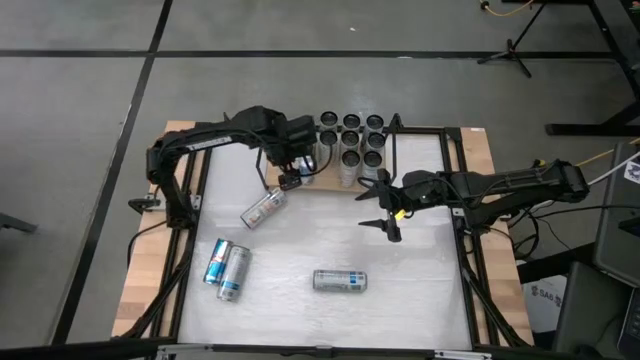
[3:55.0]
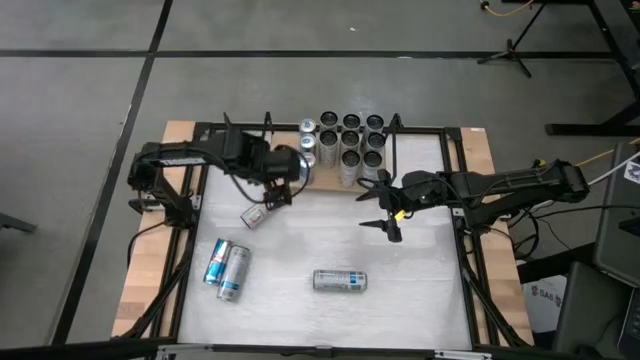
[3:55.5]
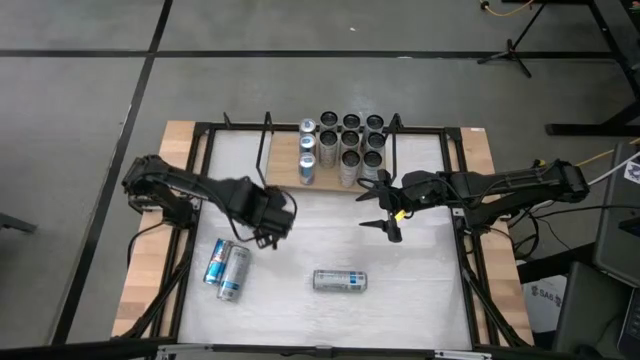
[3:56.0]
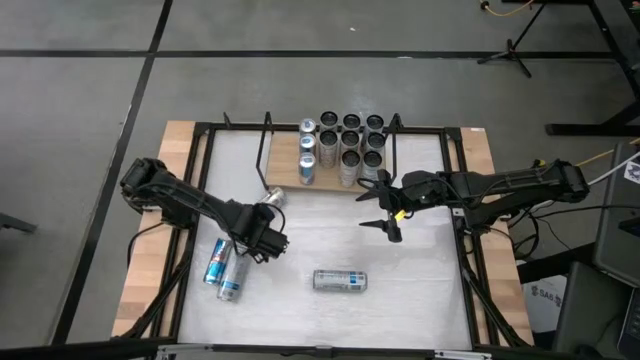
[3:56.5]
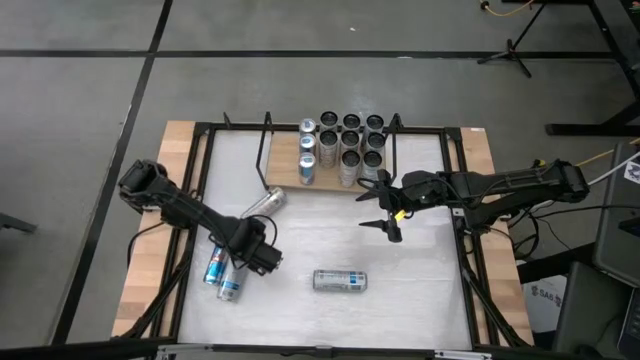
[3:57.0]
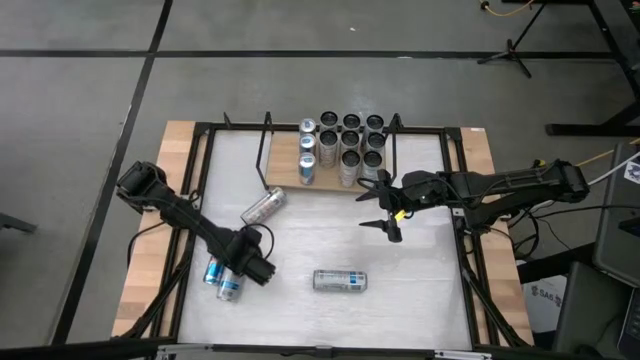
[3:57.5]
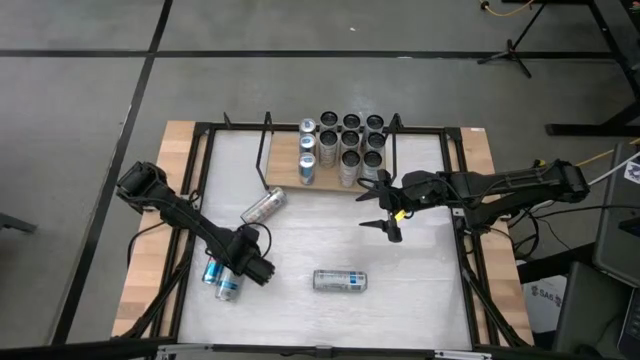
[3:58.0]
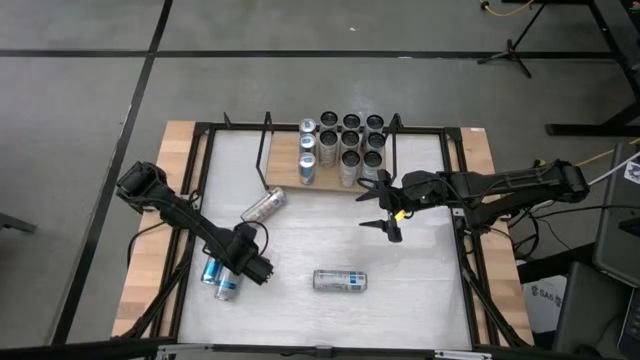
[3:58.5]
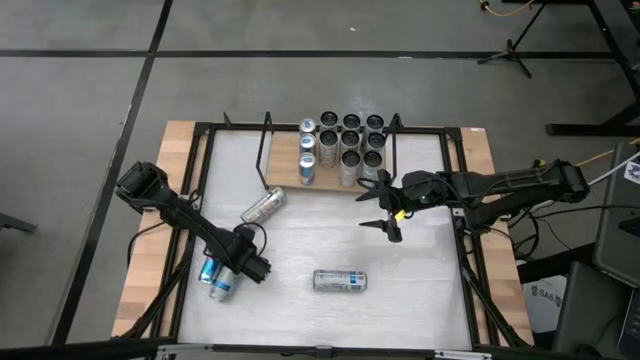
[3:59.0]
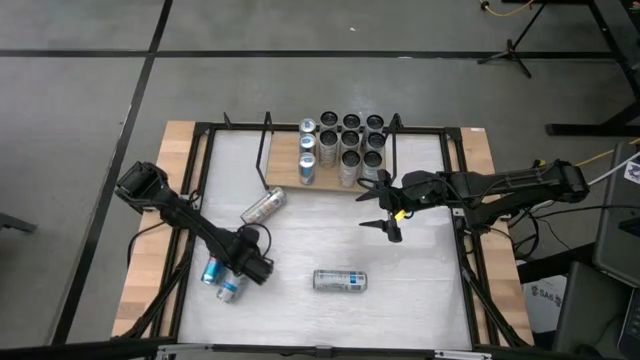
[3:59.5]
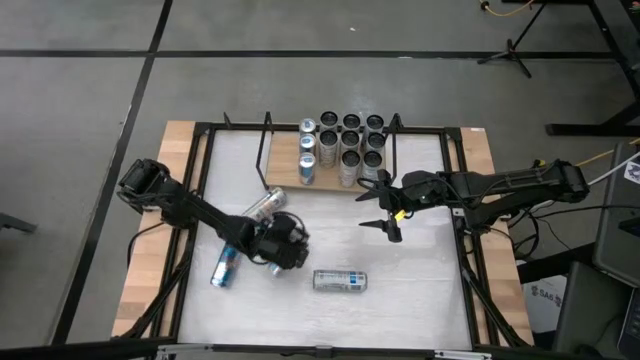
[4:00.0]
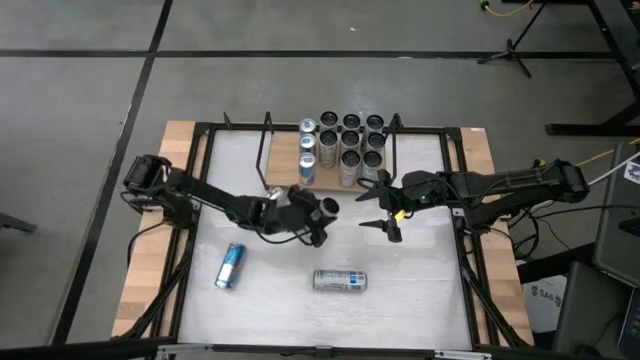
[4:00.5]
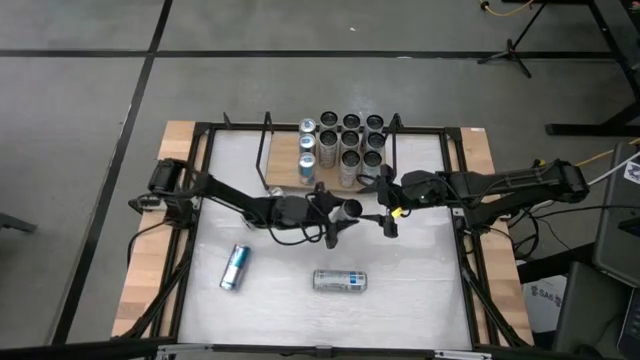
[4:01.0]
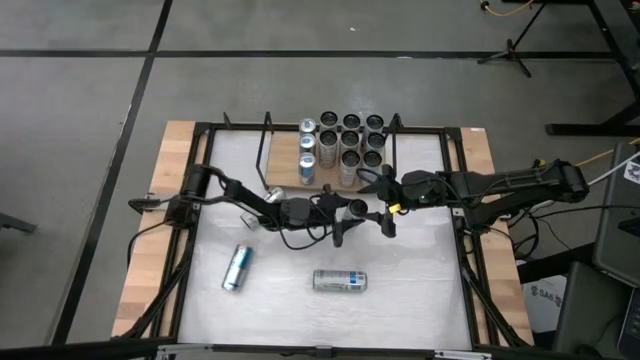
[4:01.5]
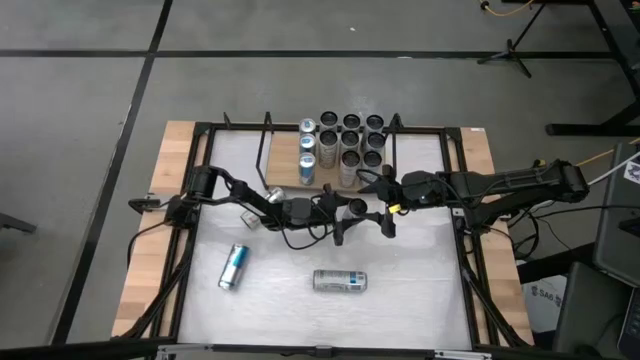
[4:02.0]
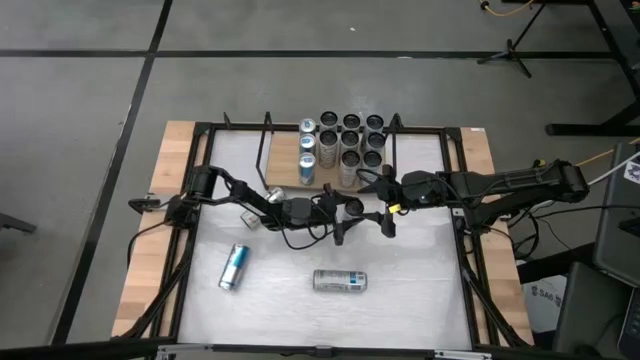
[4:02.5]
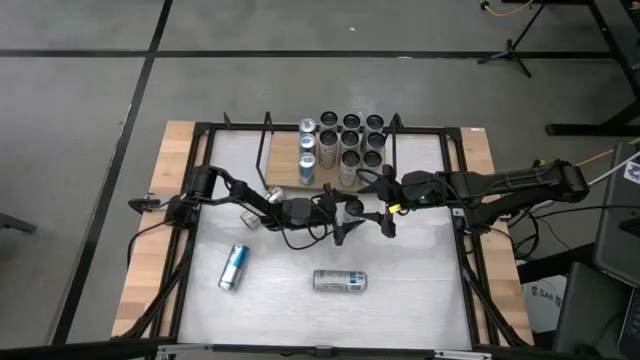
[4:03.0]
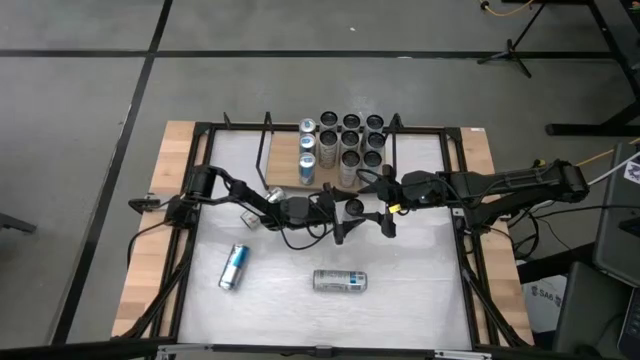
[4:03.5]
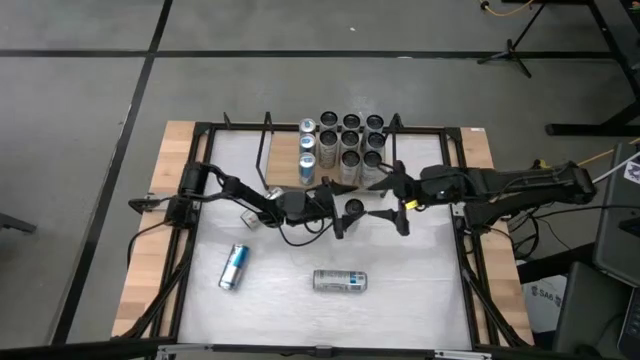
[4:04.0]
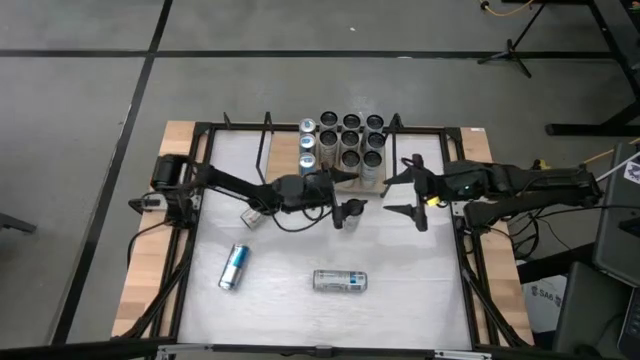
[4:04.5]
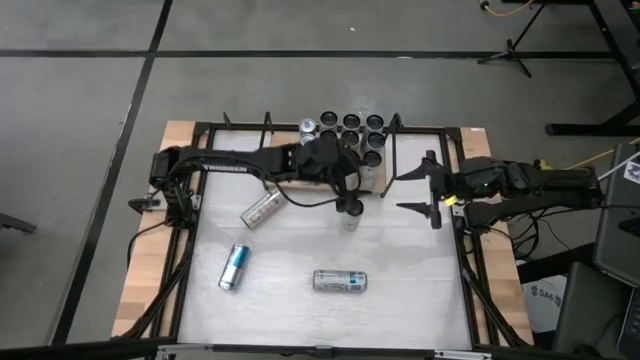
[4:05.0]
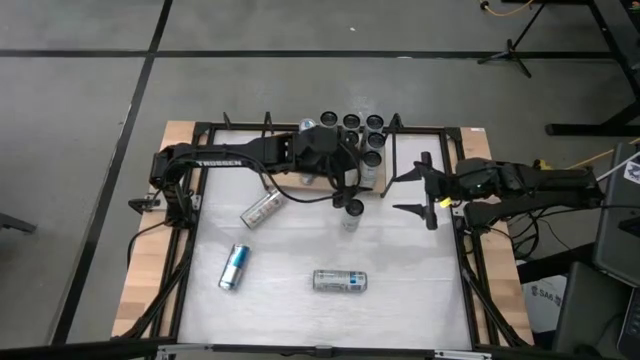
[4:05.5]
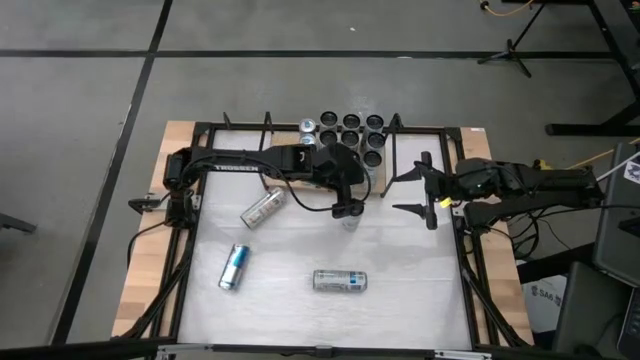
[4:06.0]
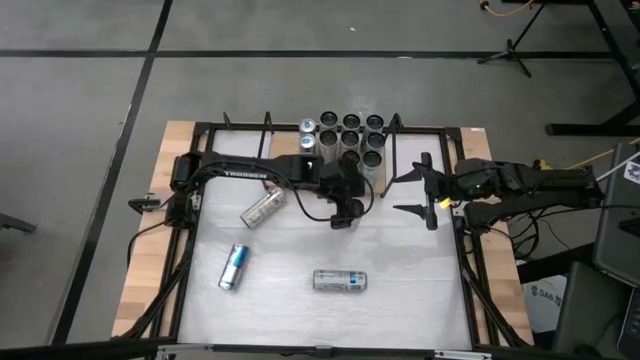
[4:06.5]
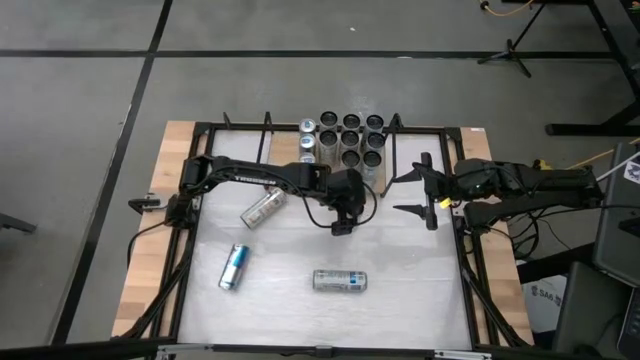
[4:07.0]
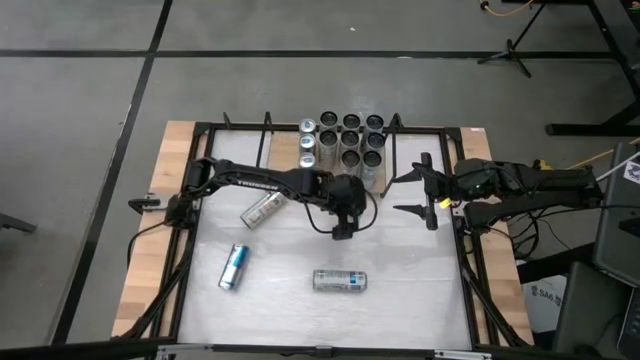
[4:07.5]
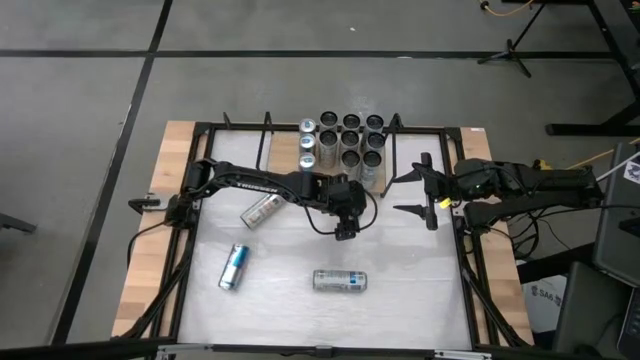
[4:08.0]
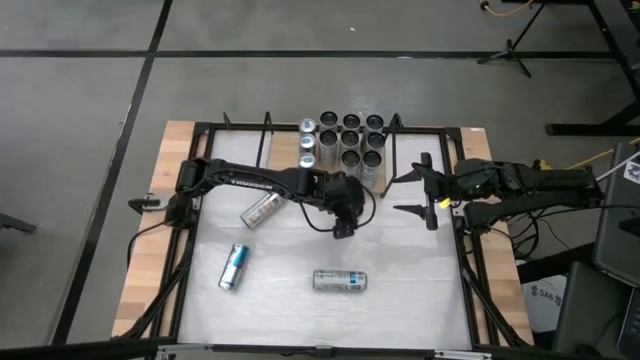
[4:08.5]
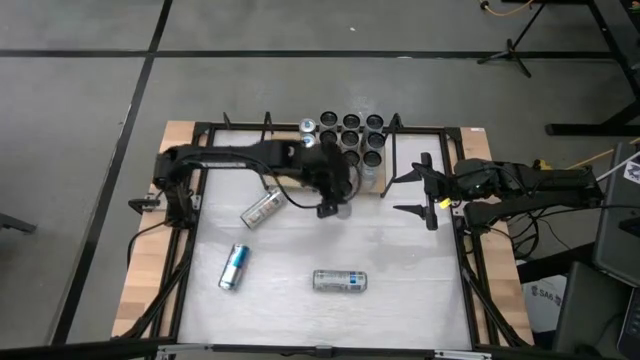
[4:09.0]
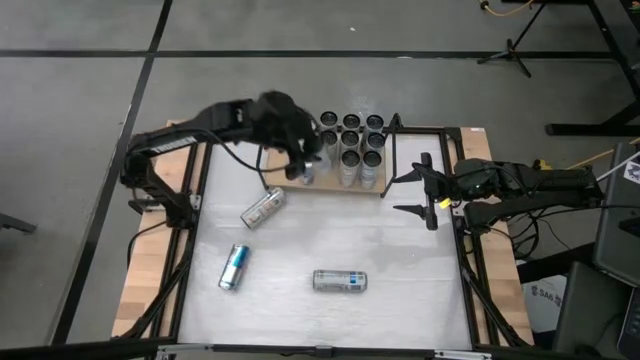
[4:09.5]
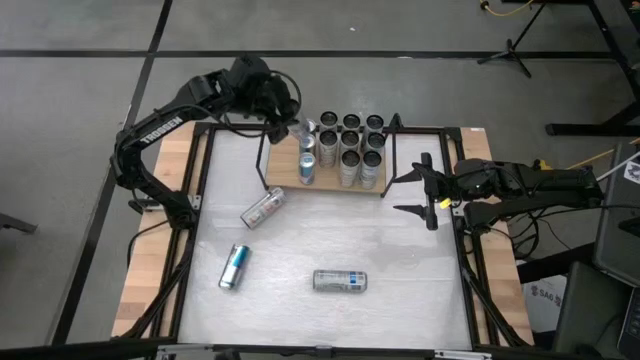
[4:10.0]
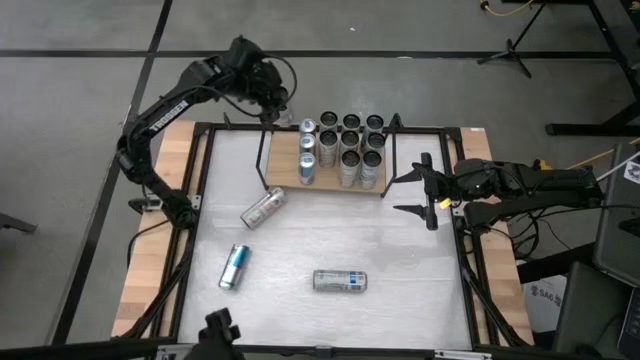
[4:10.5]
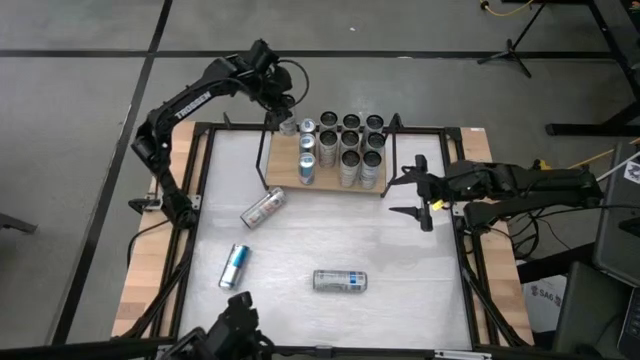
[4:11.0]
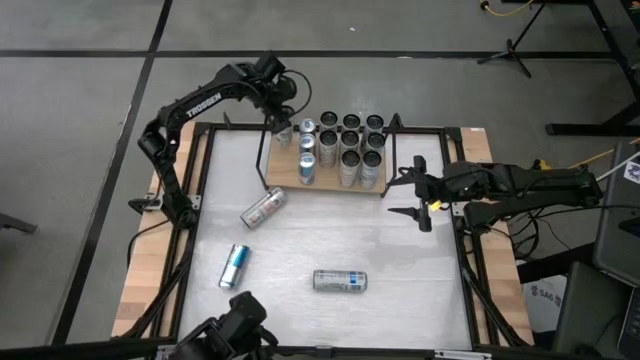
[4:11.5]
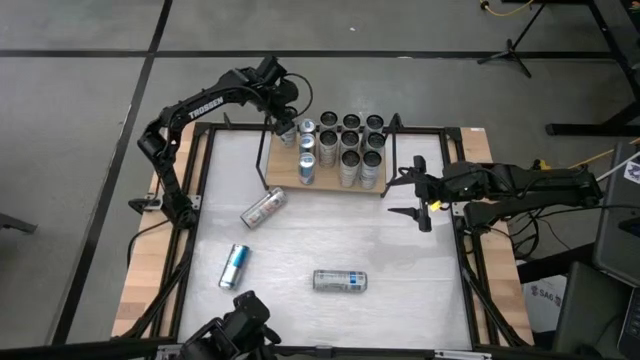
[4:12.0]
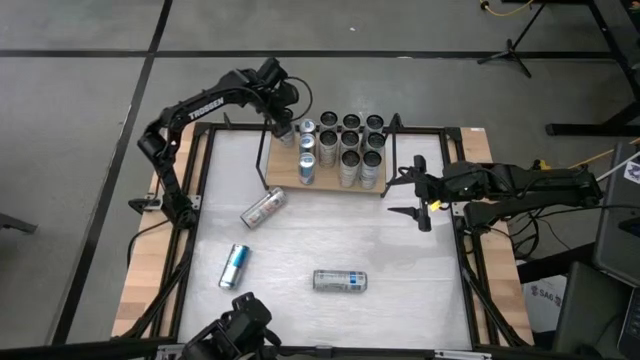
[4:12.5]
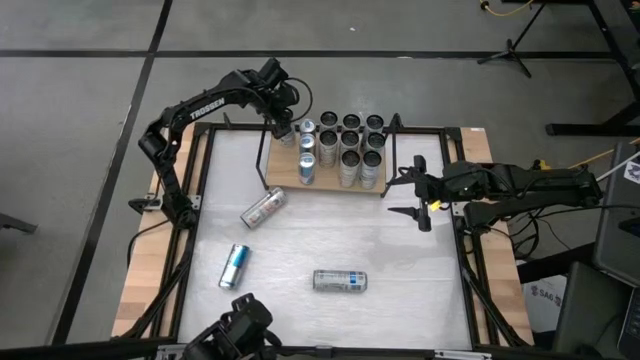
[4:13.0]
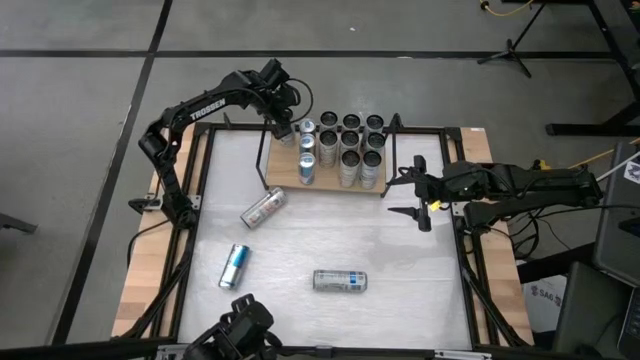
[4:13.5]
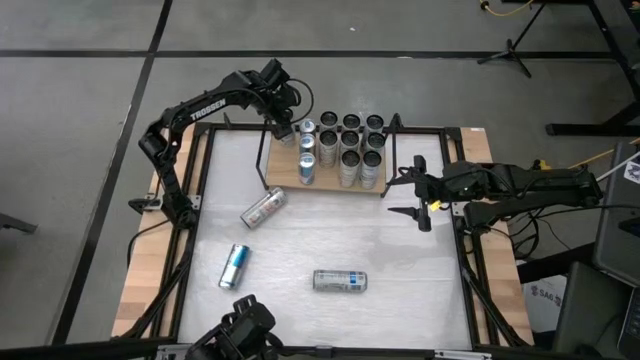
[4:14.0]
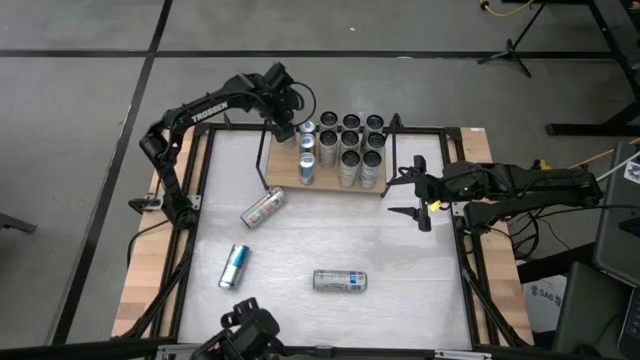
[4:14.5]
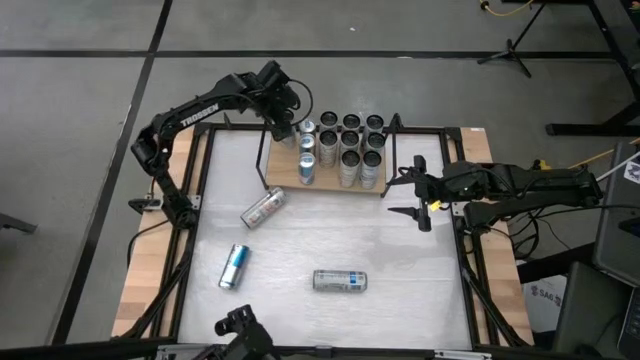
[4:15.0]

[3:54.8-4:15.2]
Task: Place canned beverage on shelf
Put the white soda can on the shelf
